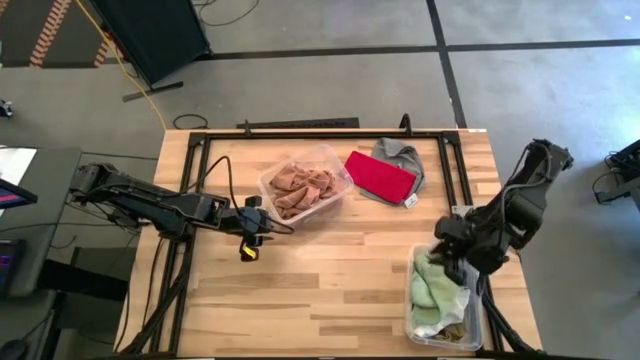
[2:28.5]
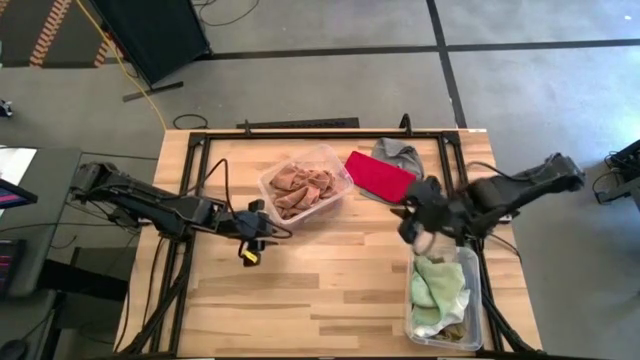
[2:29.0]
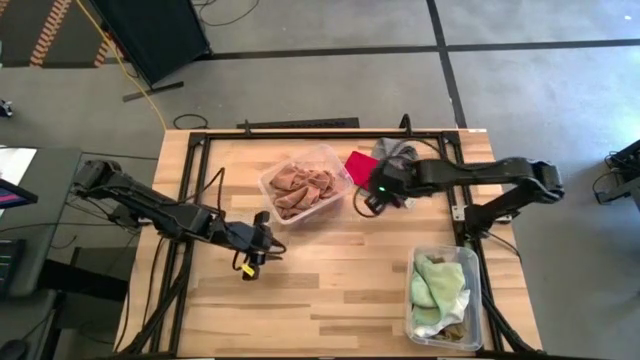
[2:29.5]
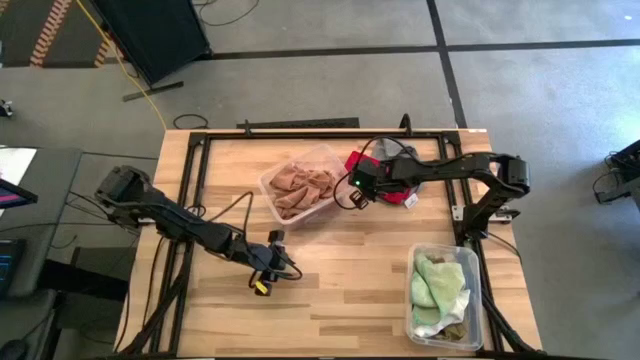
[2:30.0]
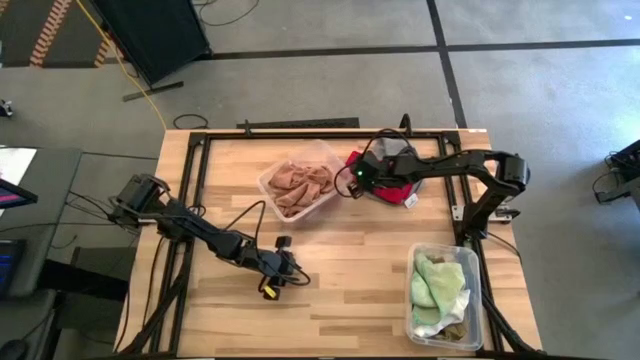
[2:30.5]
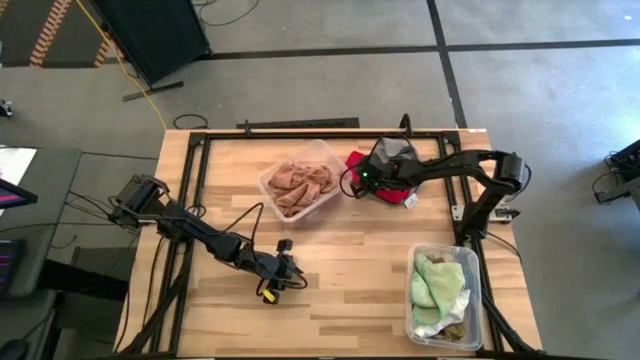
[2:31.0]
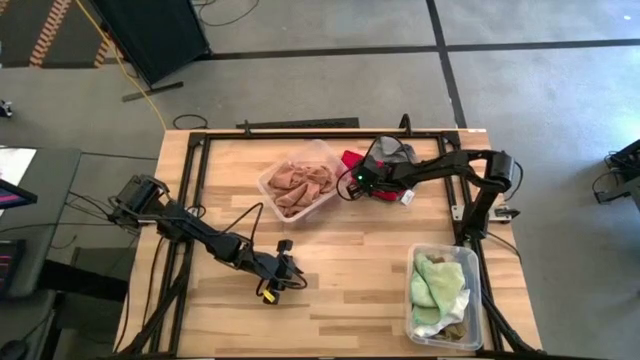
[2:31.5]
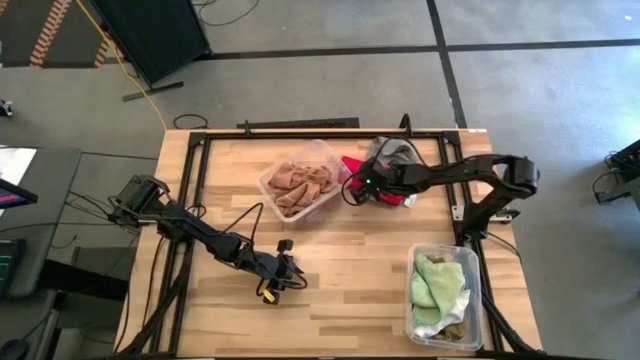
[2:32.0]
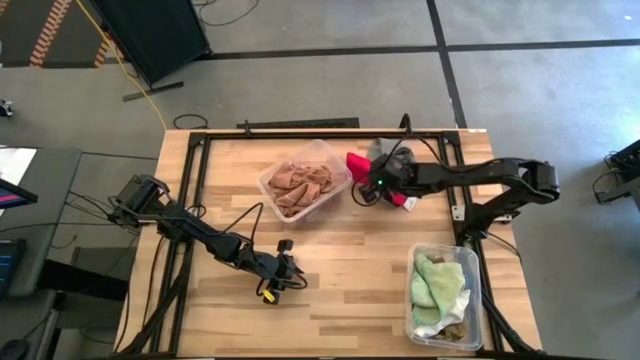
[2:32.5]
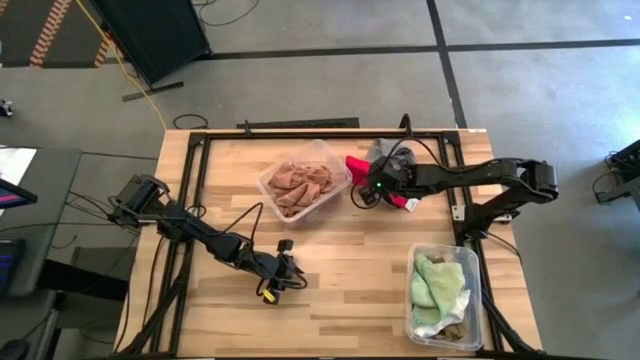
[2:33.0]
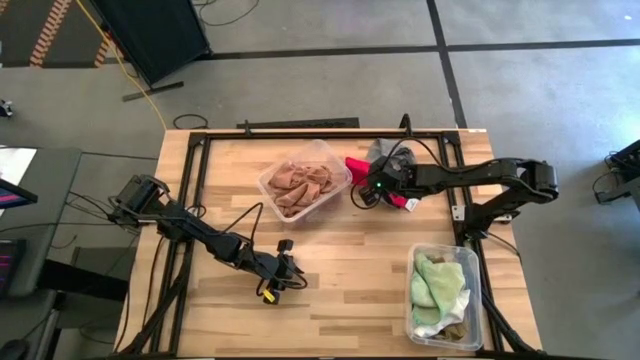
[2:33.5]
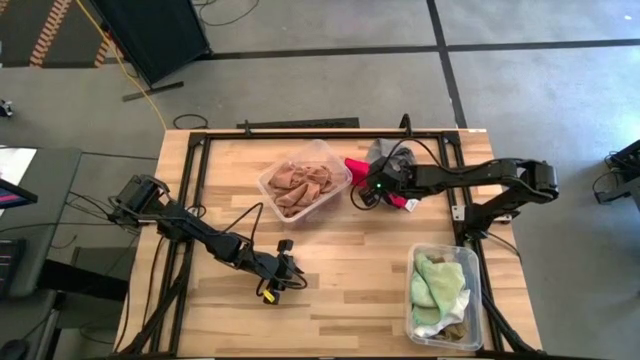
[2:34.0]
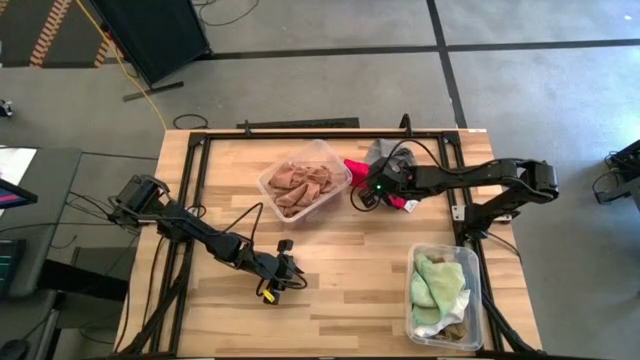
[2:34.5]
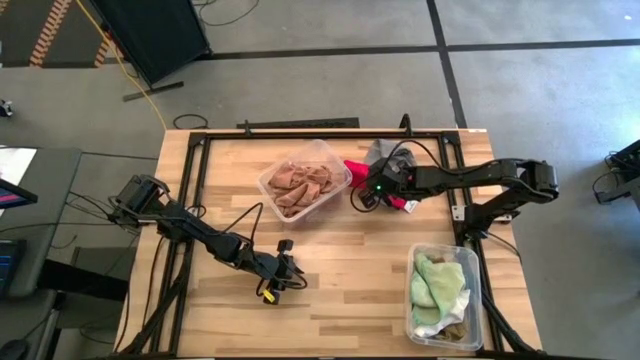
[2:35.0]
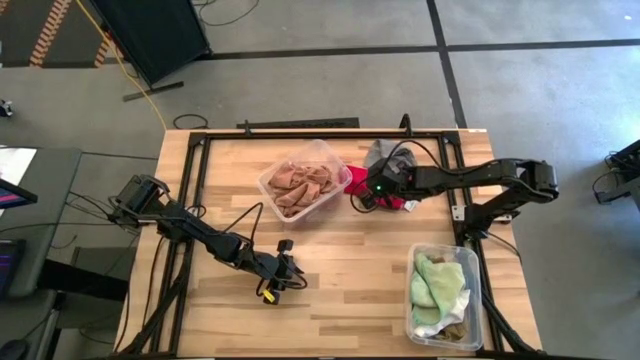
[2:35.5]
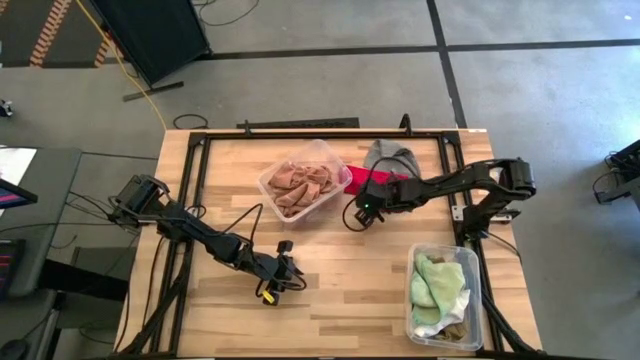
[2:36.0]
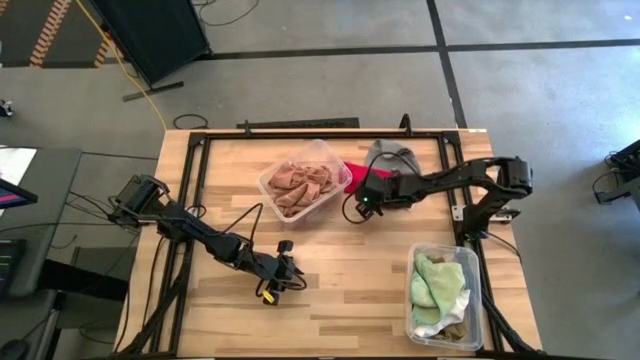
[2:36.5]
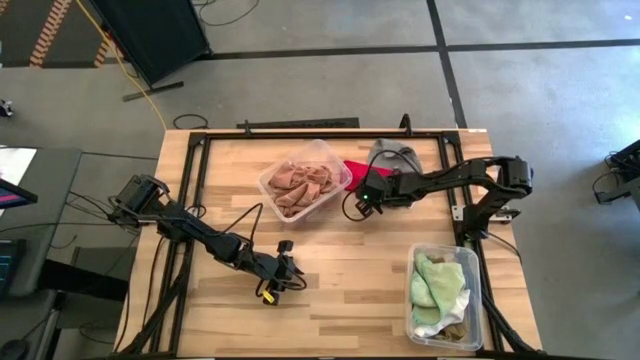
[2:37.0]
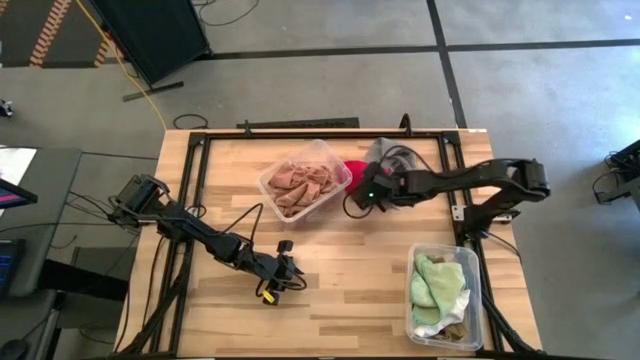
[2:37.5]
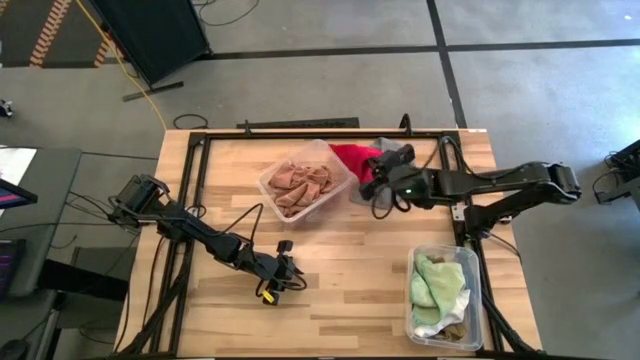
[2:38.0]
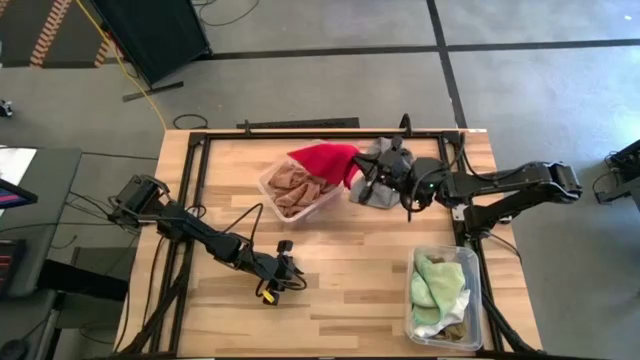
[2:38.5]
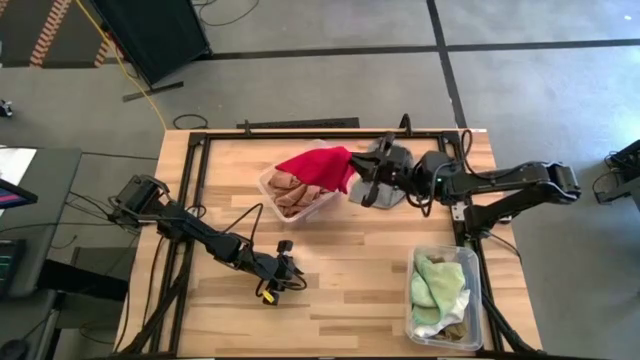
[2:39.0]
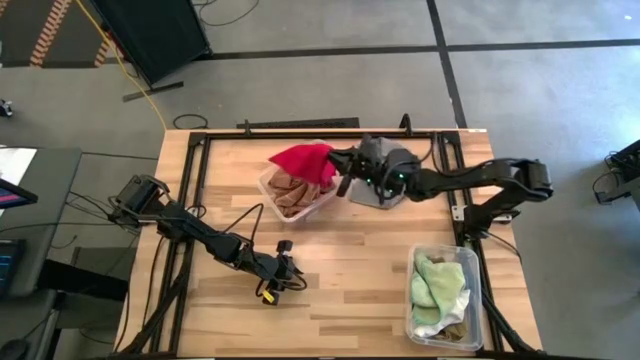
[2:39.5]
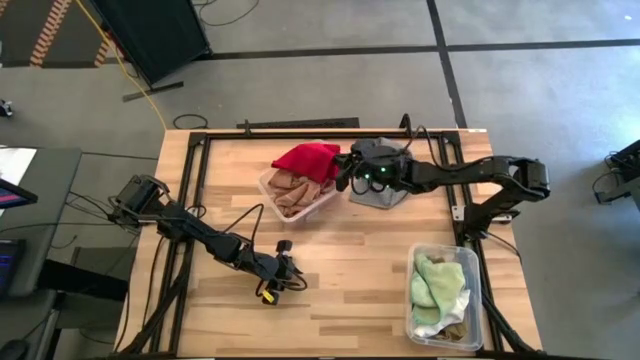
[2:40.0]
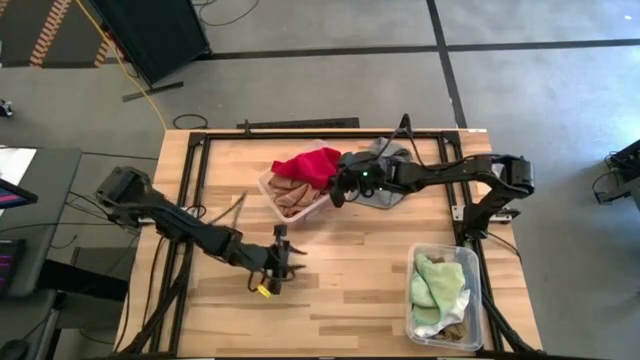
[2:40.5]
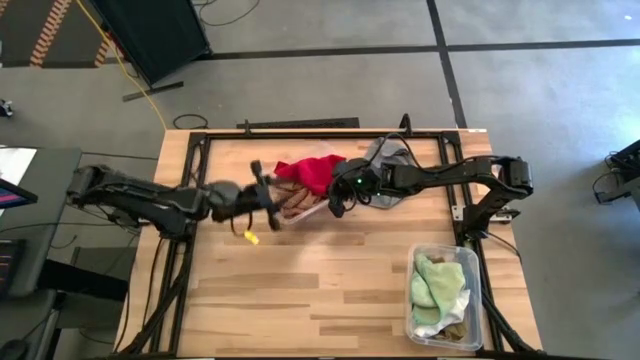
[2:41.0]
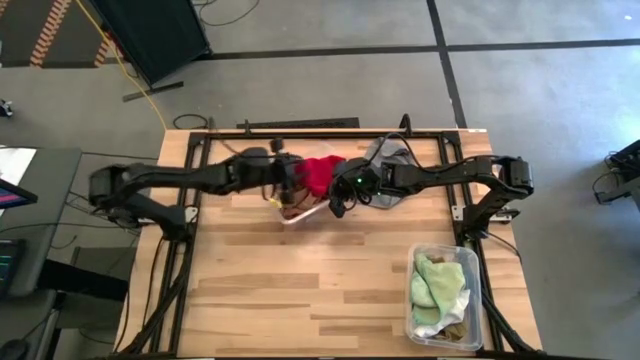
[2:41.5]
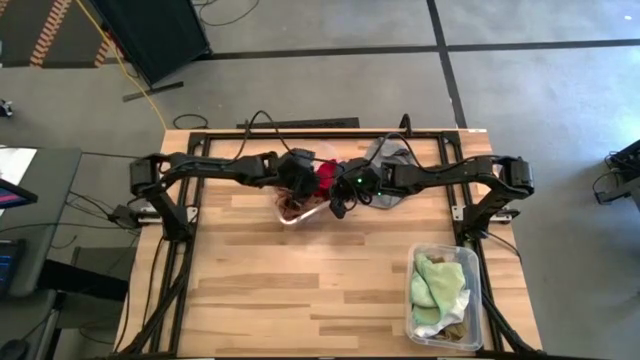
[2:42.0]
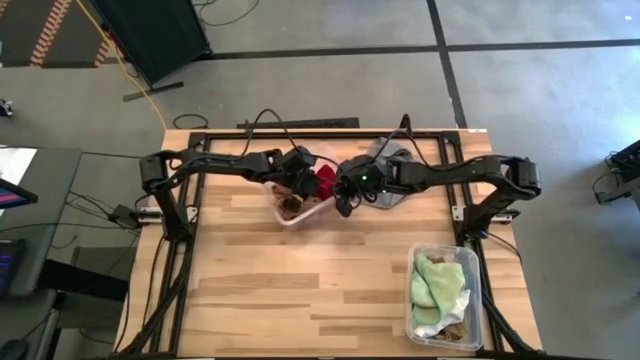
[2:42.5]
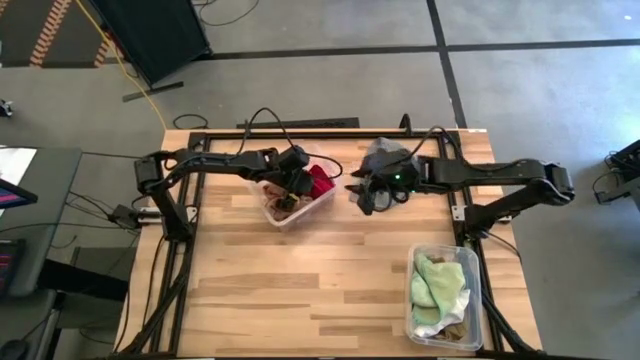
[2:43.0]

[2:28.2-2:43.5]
Task: Sort towels by color in basket
Put the red towel into the top transparent bin

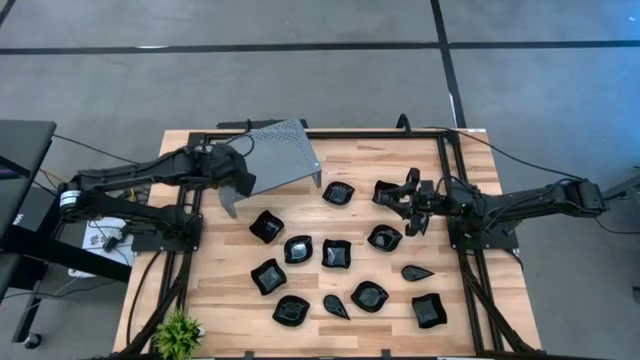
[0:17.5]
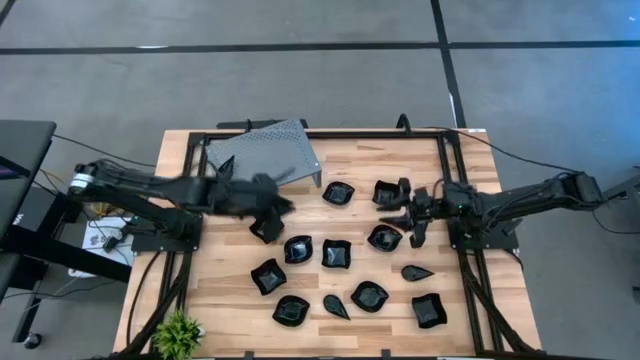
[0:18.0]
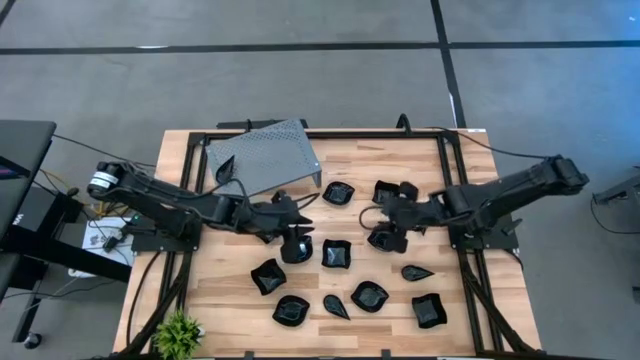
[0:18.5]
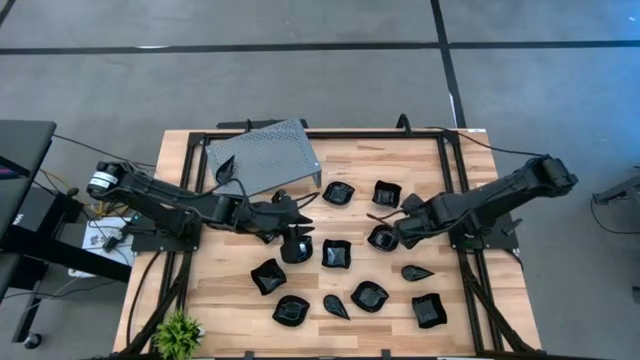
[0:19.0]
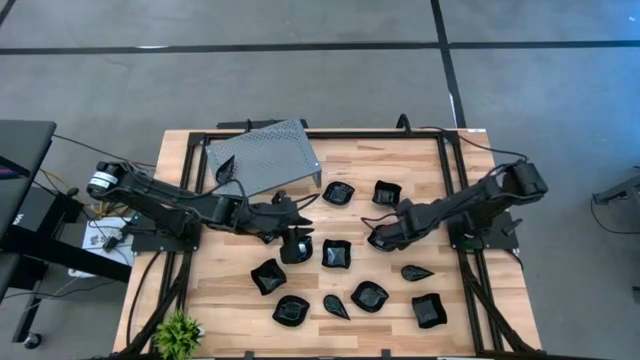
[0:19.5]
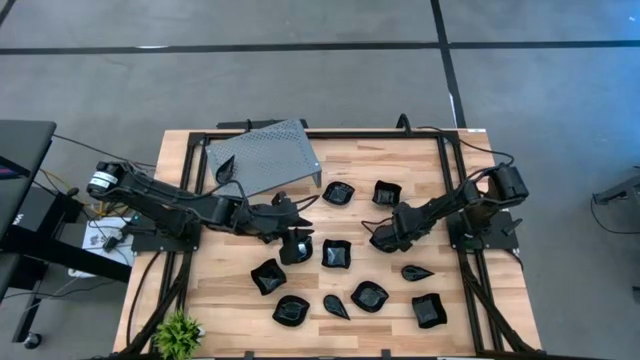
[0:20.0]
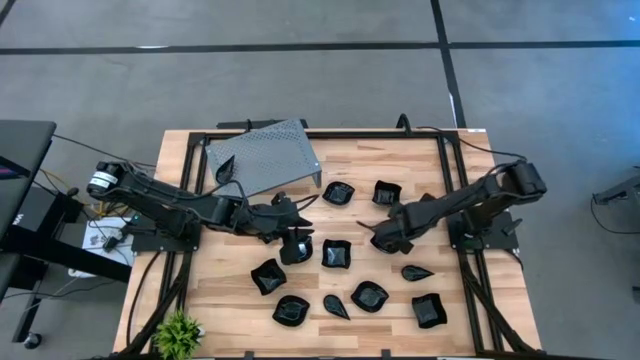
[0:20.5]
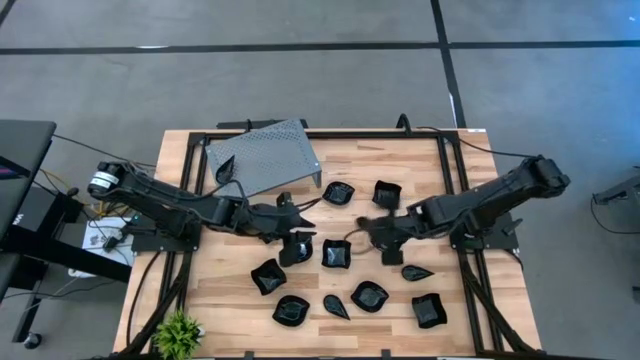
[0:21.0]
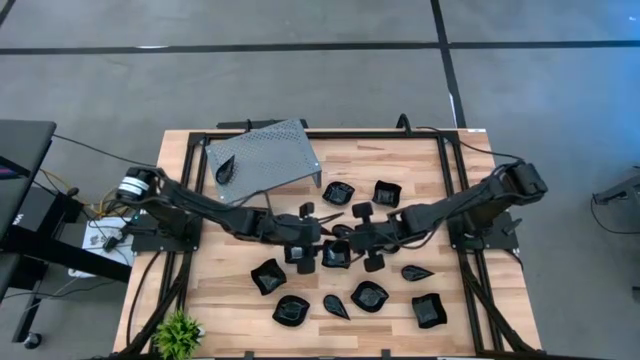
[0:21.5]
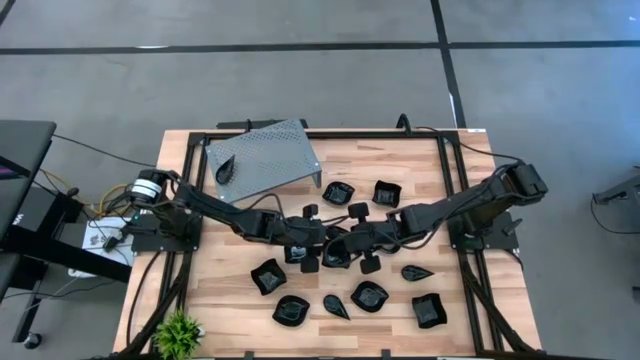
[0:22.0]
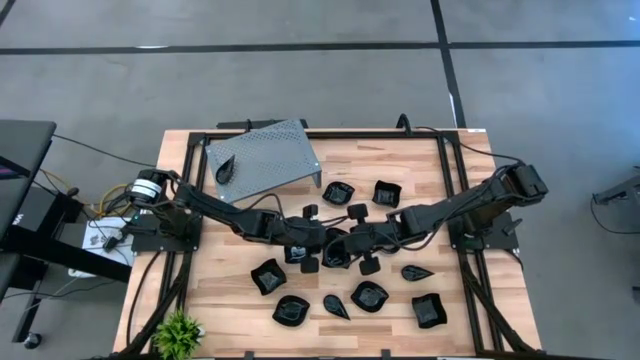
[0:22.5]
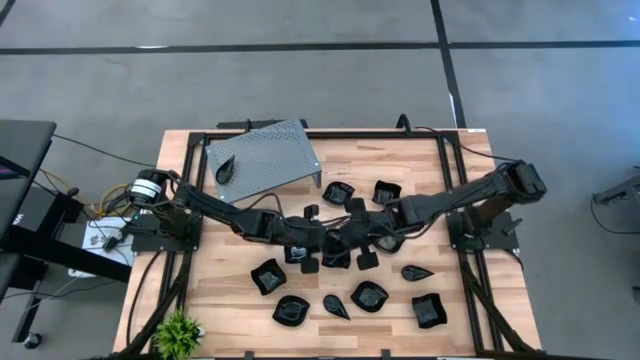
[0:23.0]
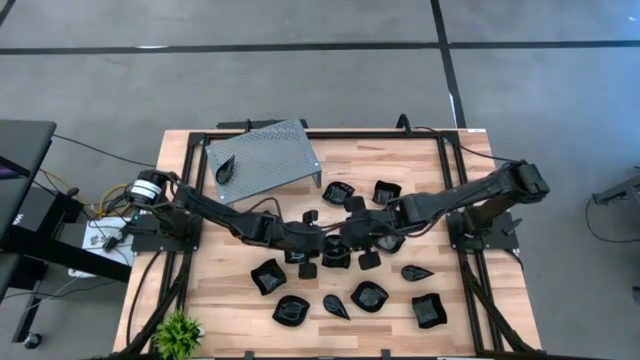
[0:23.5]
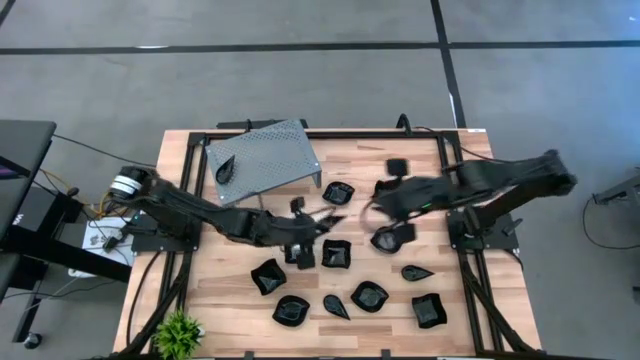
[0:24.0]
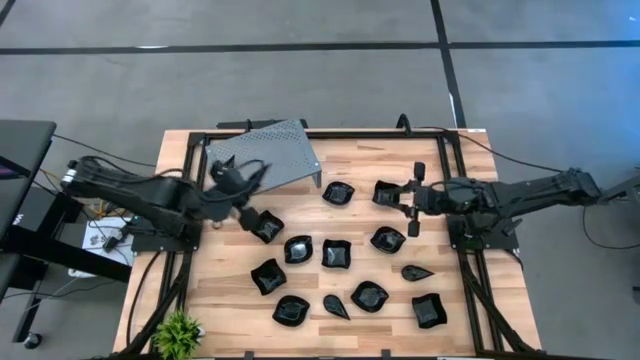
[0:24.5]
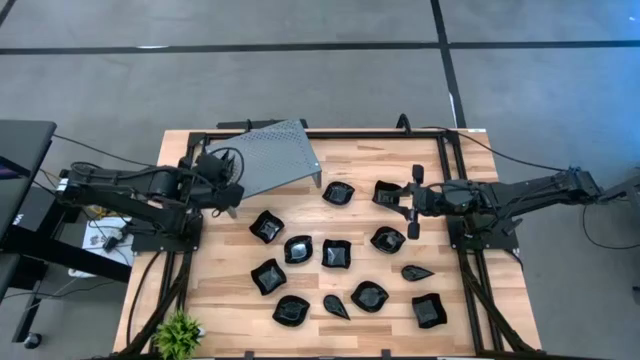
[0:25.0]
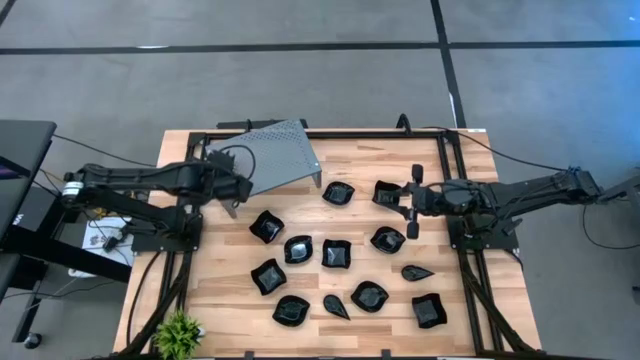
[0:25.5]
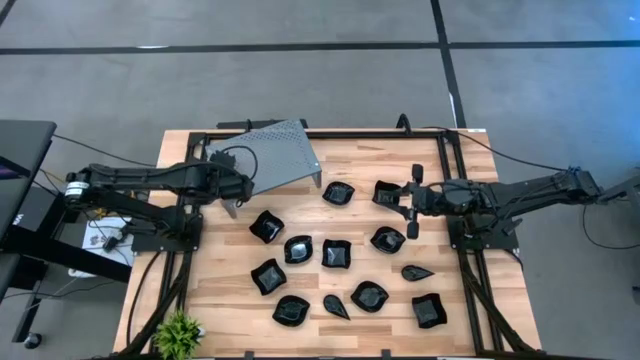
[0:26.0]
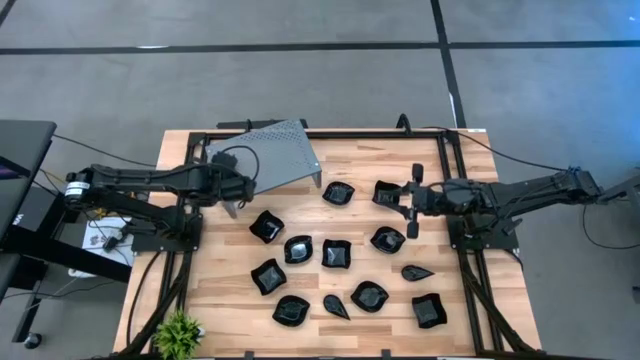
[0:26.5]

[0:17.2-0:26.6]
Task: Pick & Place Mini shaped plates
Stack the black drop plate on top of the black drop plate on the shelf
